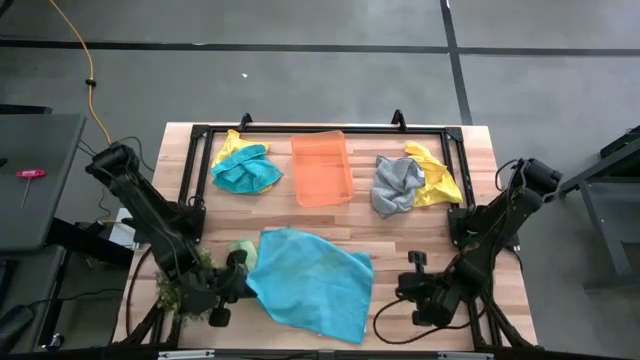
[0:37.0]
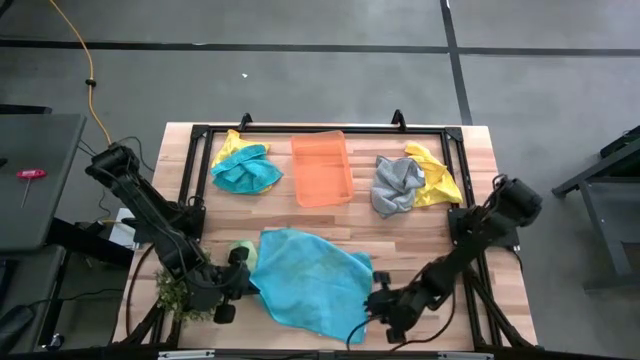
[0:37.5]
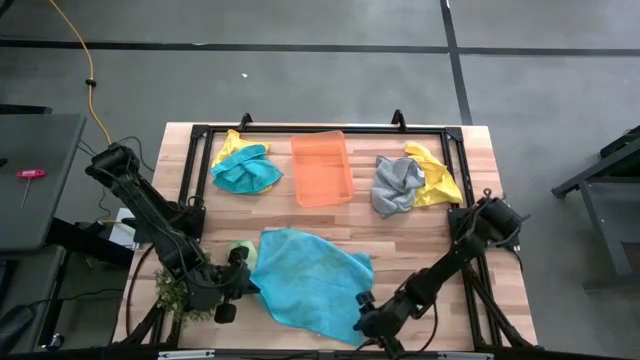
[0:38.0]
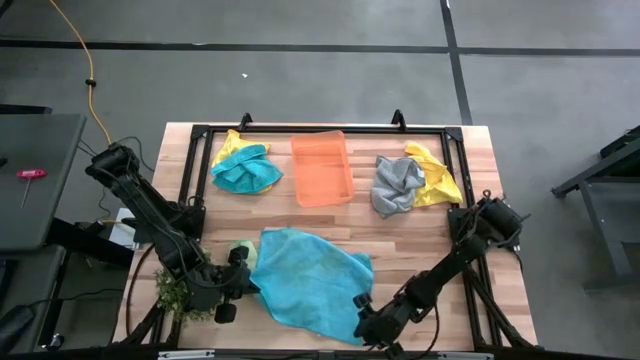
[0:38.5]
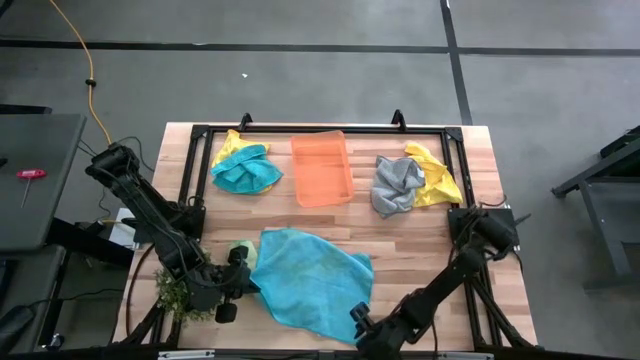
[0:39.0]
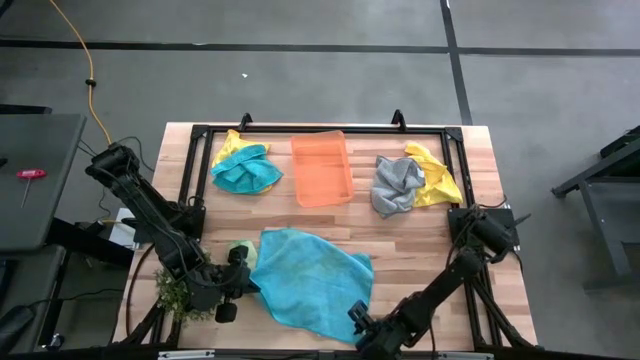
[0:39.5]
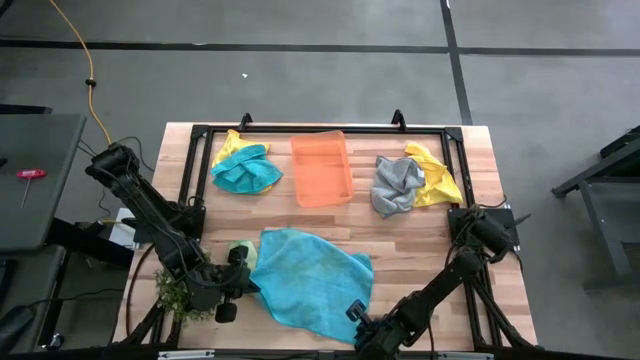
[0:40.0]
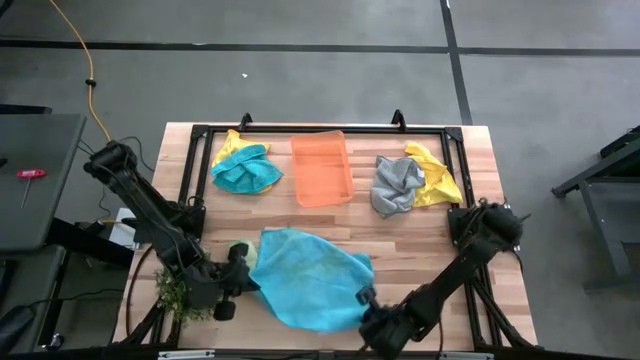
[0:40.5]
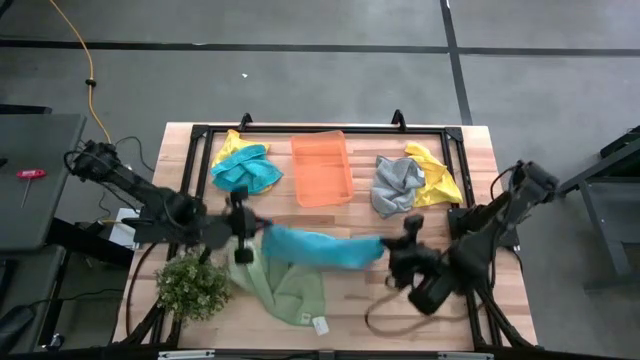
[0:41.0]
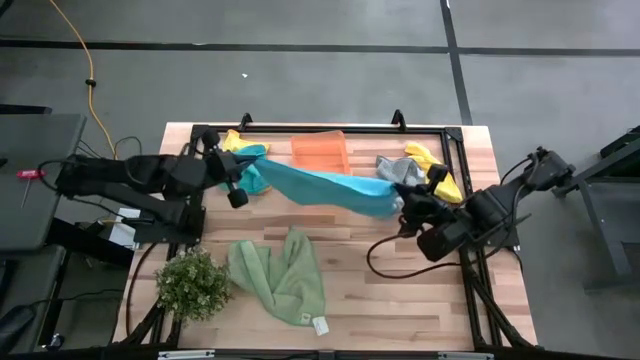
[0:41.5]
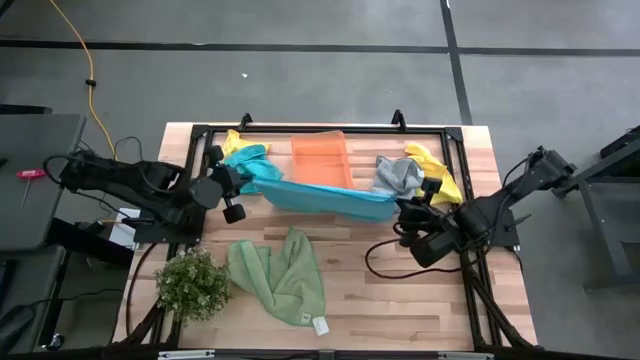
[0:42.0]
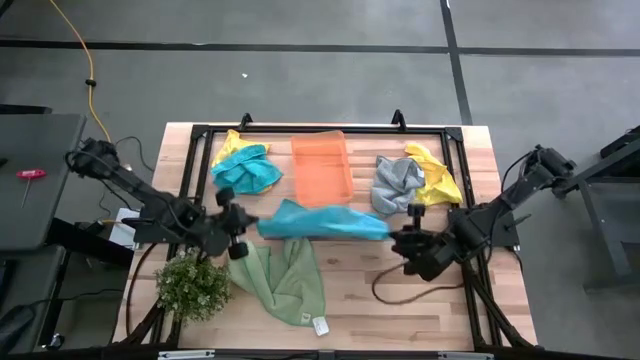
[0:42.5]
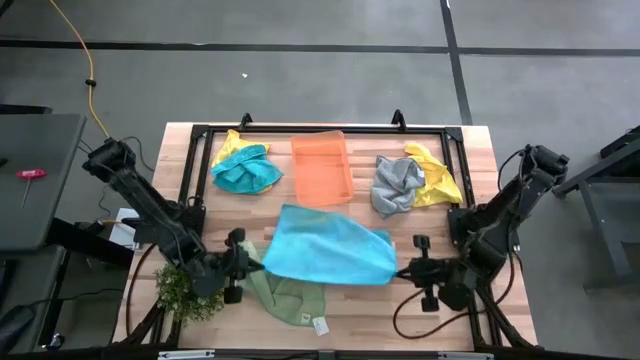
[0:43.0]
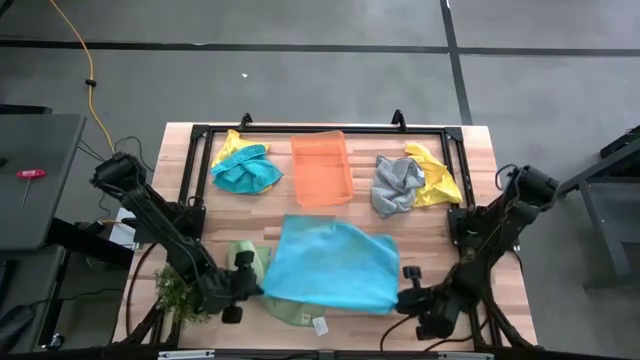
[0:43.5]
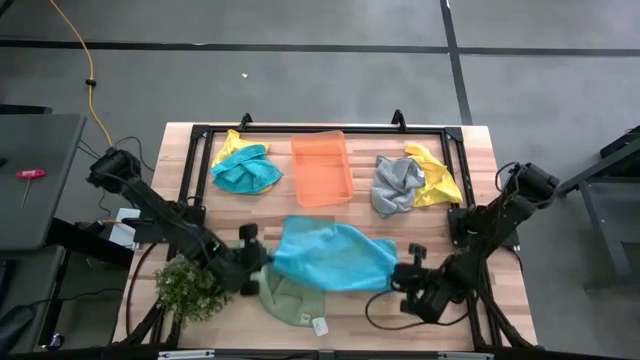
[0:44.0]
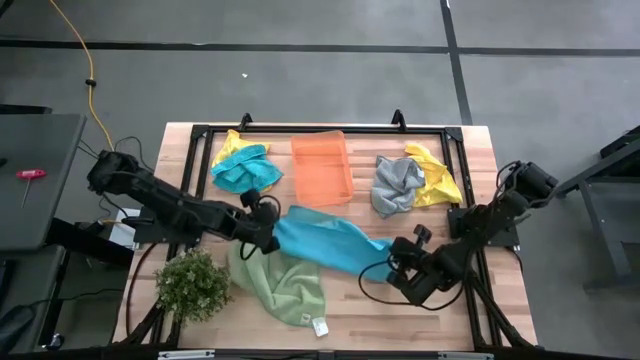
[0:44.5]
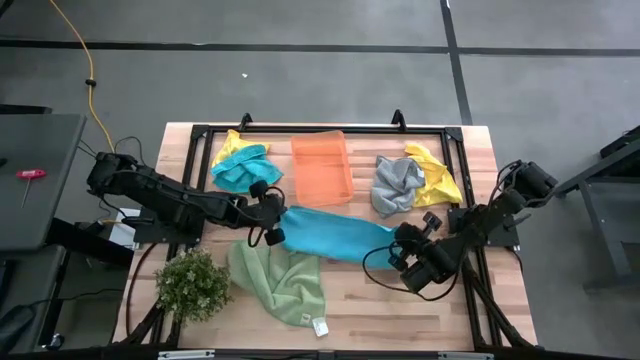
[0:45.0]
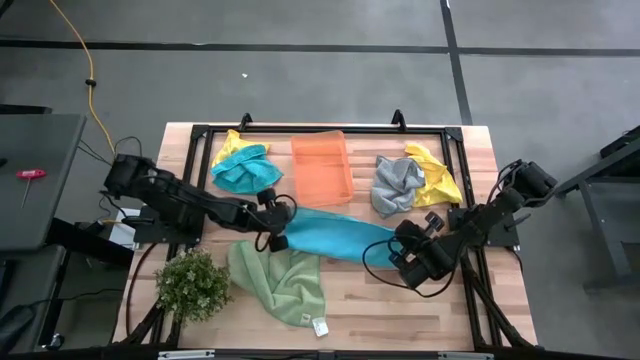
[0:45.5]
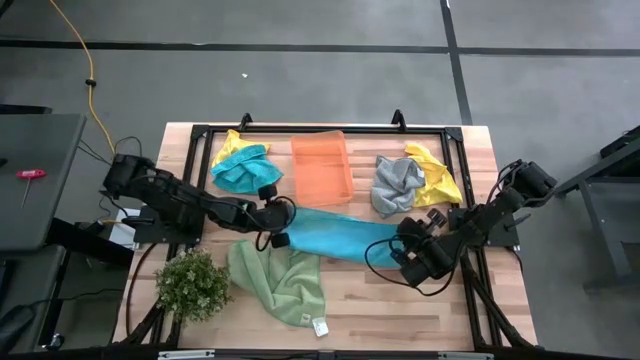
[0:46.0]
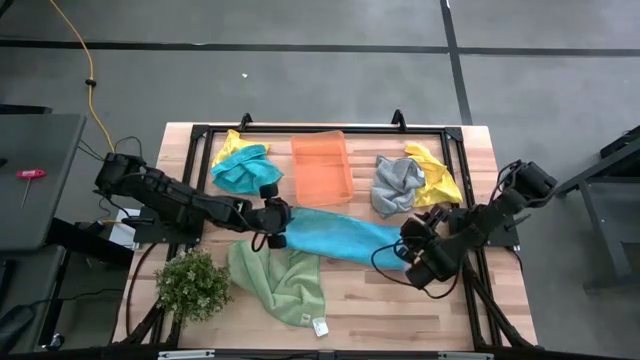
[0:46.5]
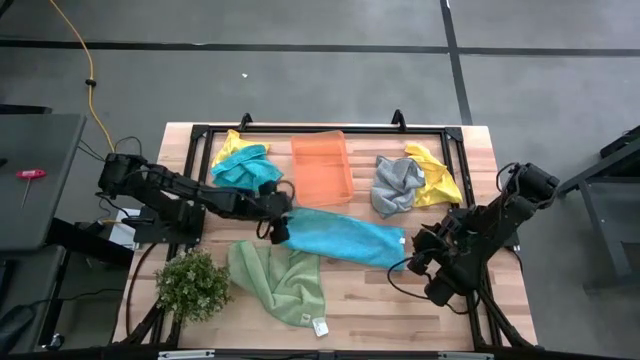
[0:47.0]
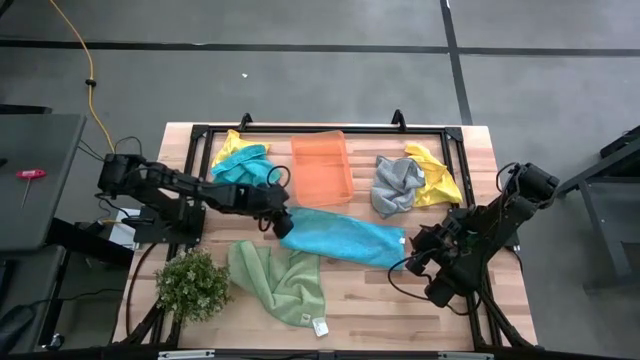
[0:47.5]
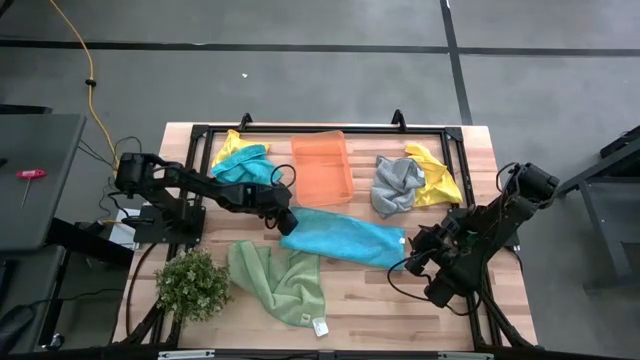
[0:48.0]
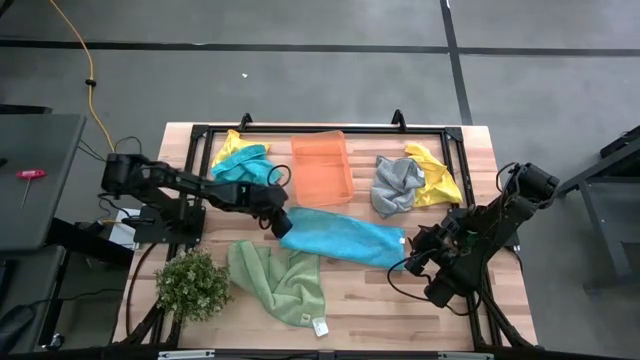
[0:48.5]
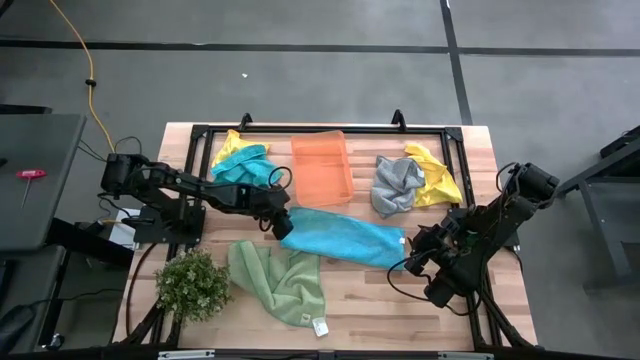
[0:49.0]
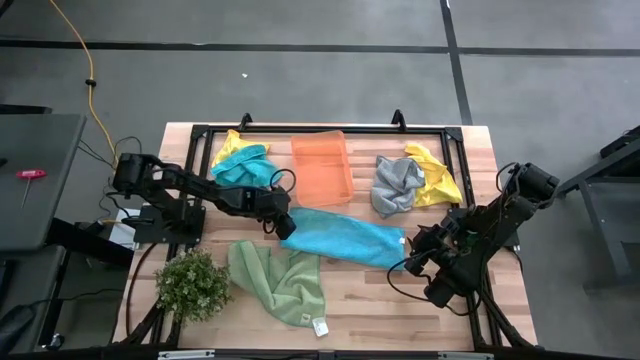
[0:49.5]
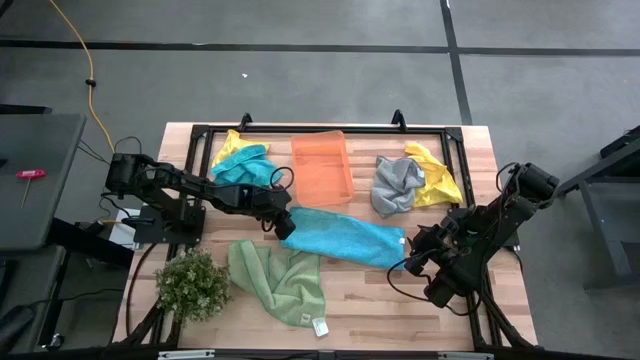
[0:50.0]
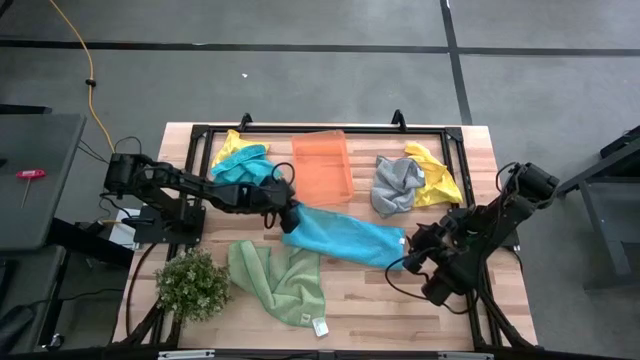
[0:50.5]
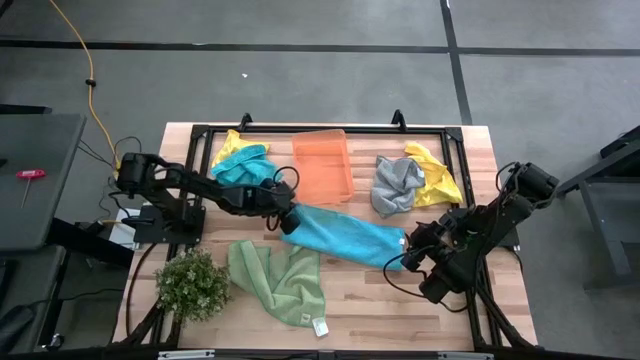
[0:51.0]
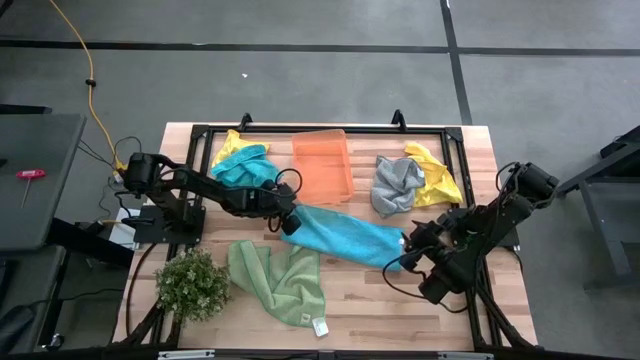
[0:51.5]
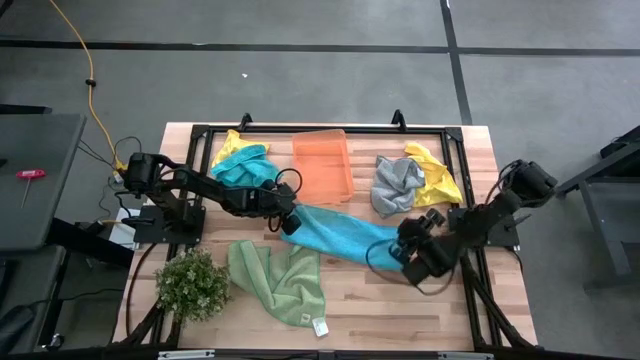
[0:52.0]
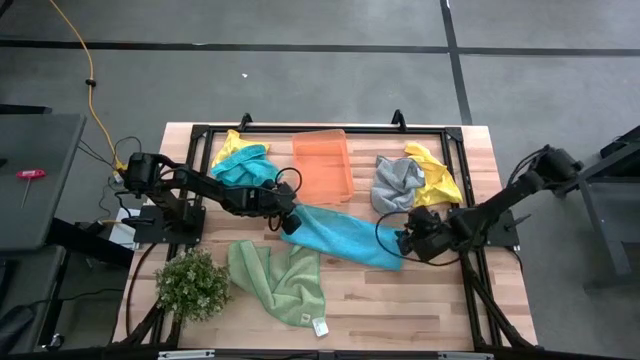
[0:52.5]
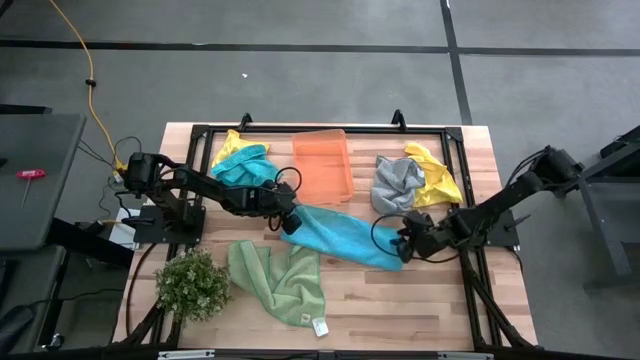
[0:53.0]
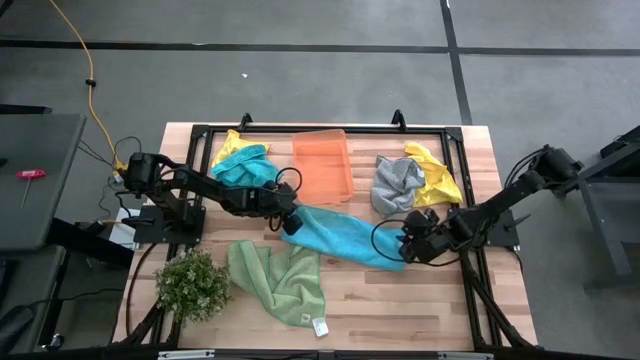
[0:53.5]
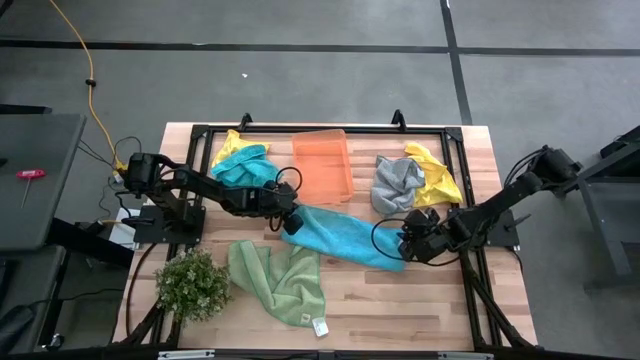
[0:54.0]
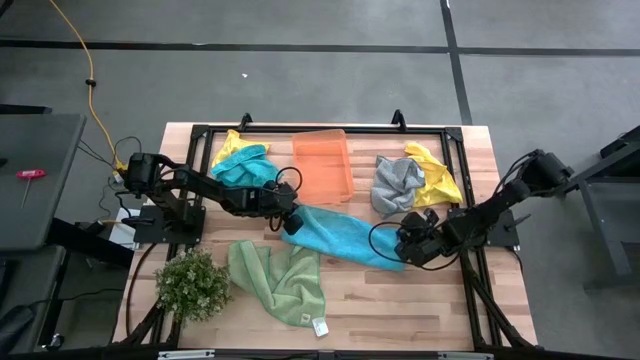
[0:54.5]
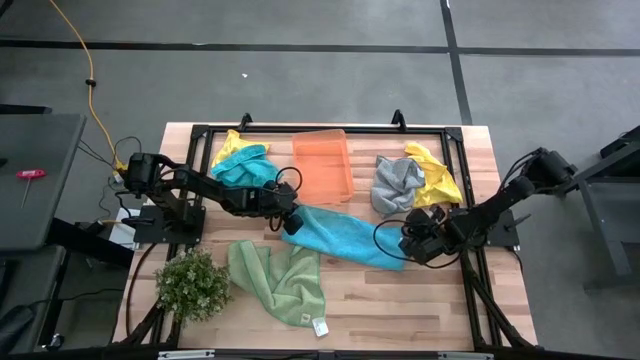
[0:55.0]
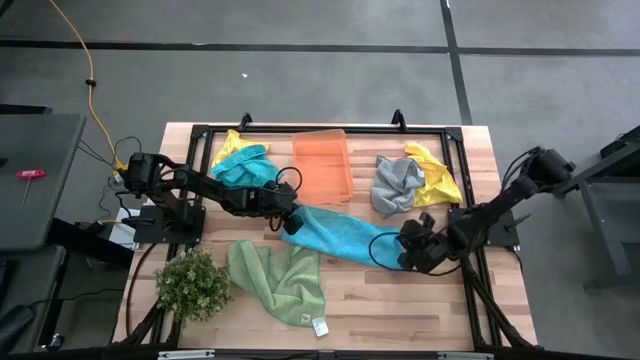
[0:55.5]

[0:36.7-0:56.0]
Task: Fold microfiber towels
Fold the bottom blue microfiber cloth
